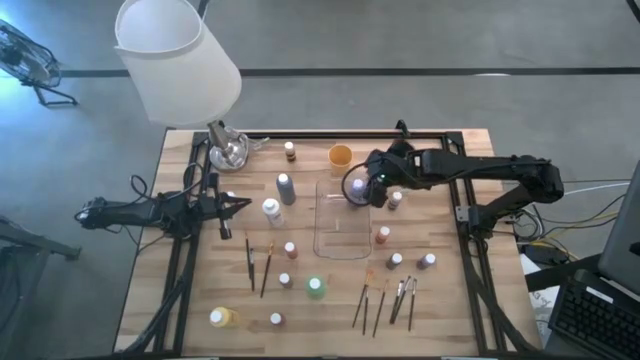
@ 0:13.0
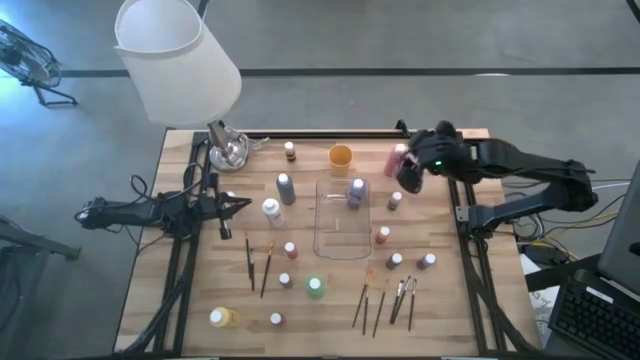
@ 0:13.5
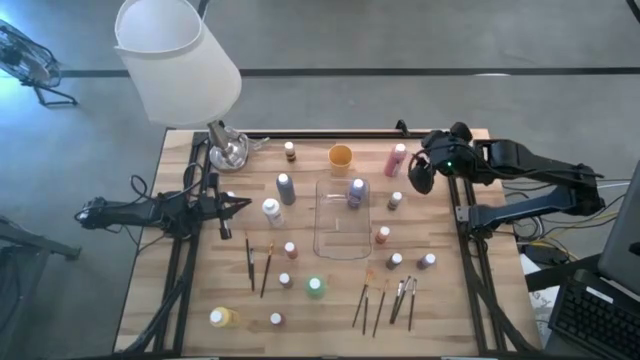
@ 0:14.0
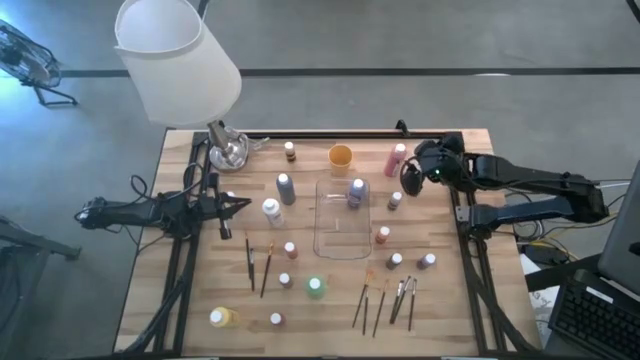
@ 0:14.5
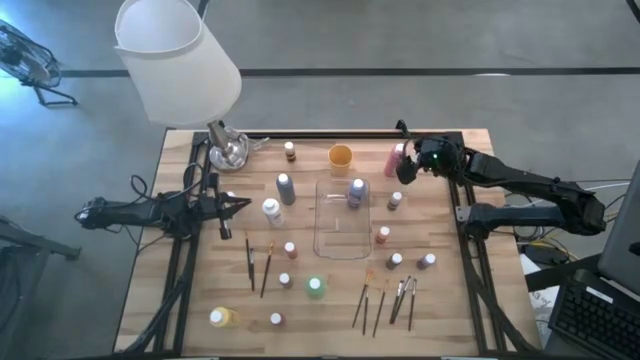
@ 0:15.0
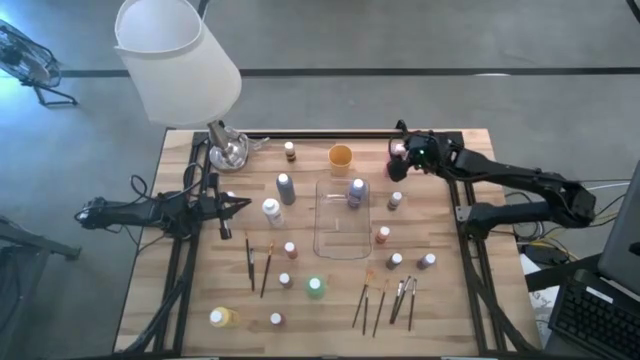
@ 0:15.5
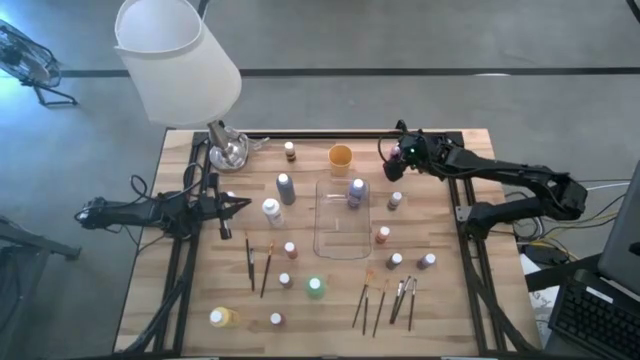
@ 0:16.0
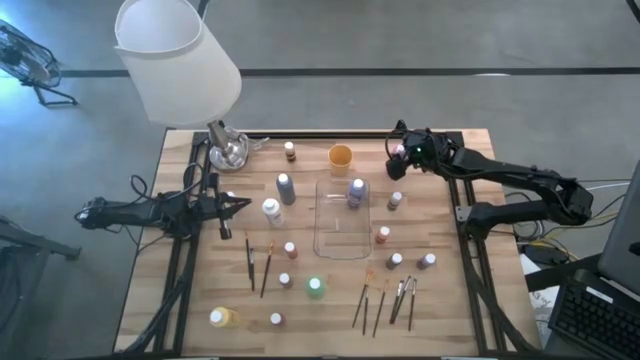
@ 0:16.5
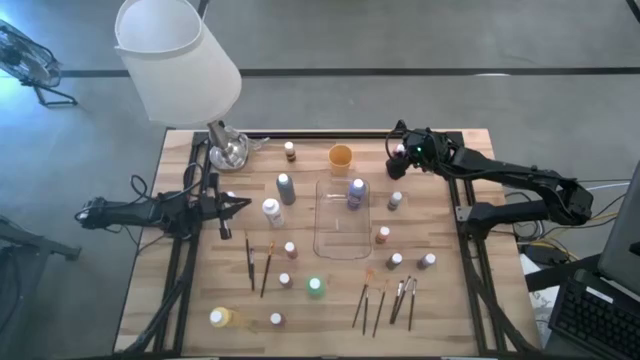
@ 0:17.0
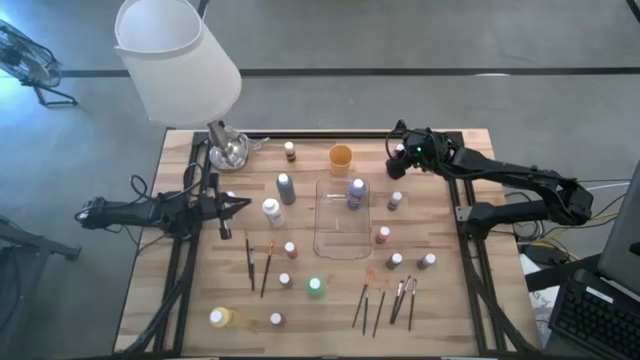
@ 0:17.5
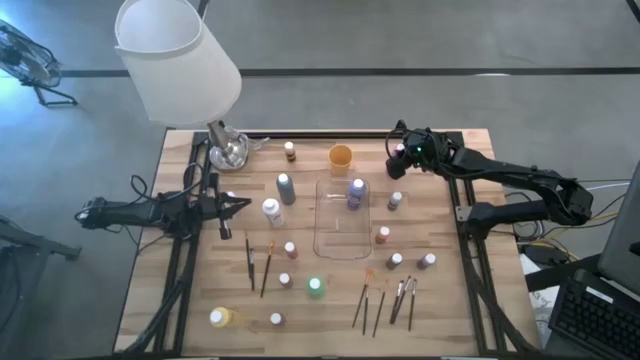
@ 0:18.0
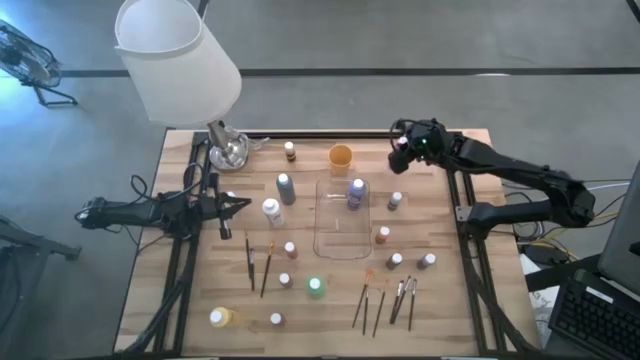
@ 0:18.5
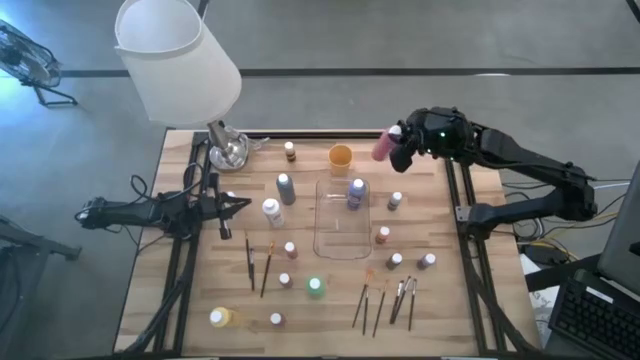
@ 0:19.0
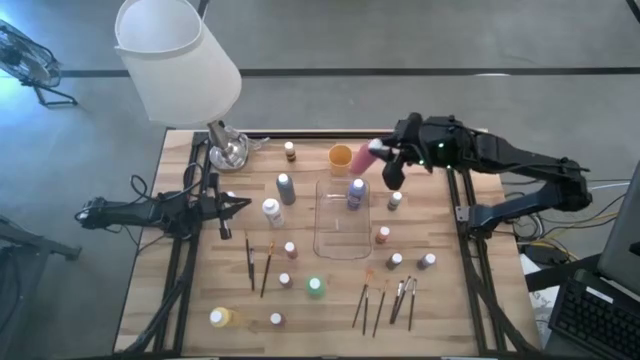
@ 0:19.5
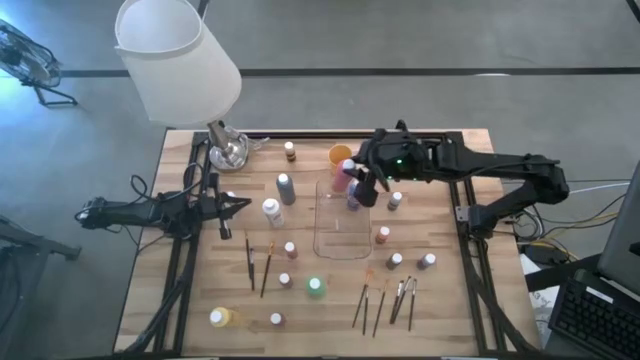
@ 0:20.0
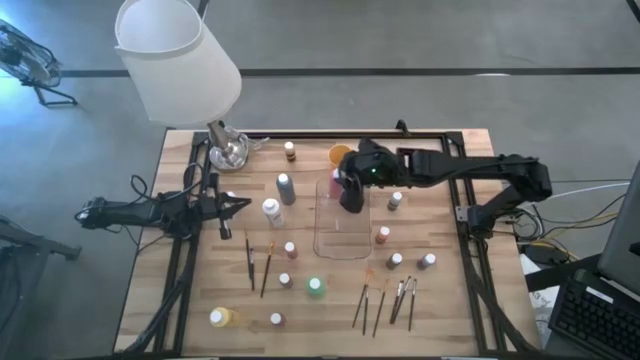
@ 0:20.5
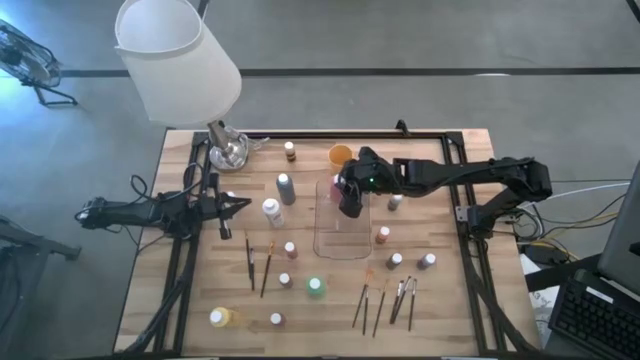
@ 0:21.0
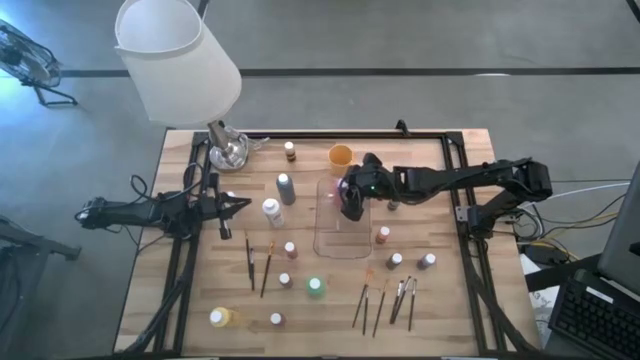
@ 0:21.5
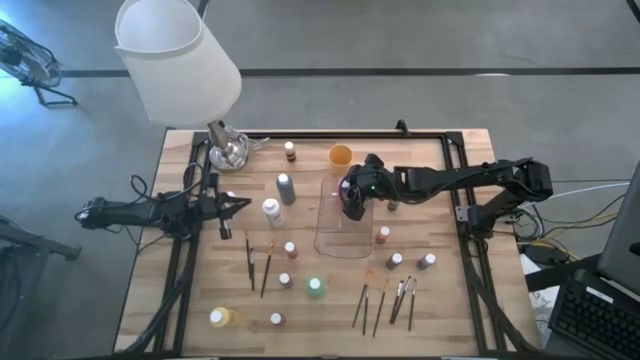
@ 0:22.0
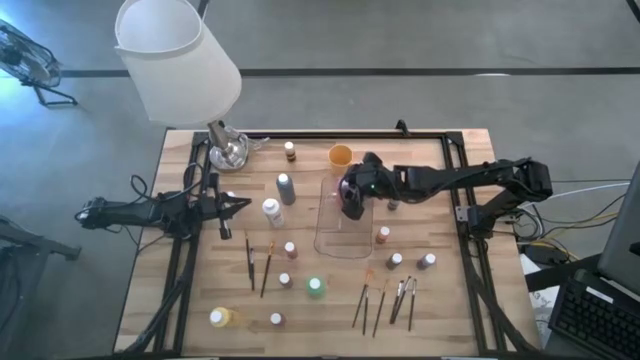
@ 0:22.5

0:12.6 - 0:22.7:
Task: Pick & Place Paint Supplies
Put the red paint bottle into the transparent bin

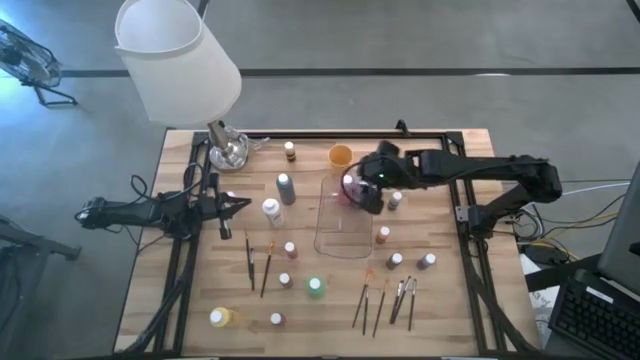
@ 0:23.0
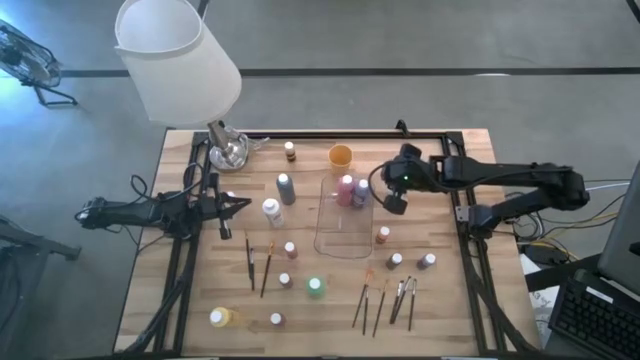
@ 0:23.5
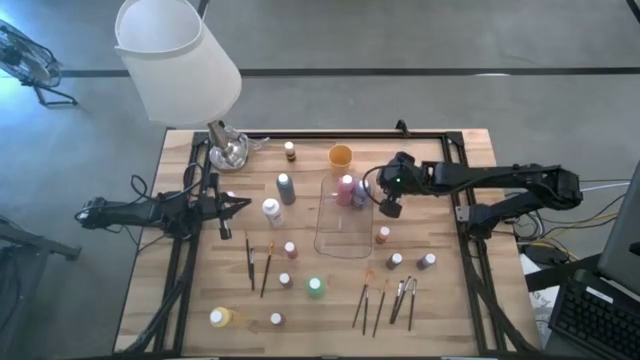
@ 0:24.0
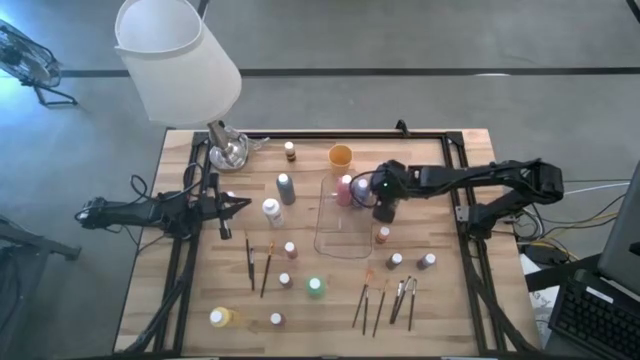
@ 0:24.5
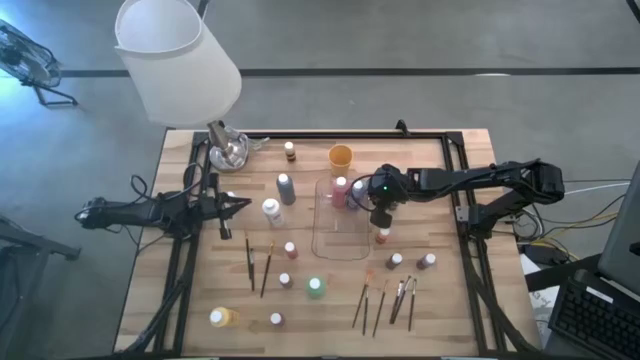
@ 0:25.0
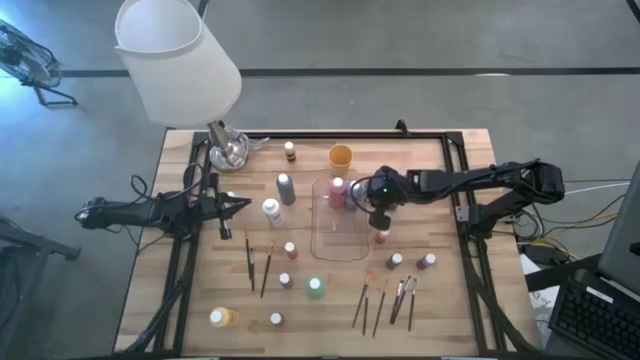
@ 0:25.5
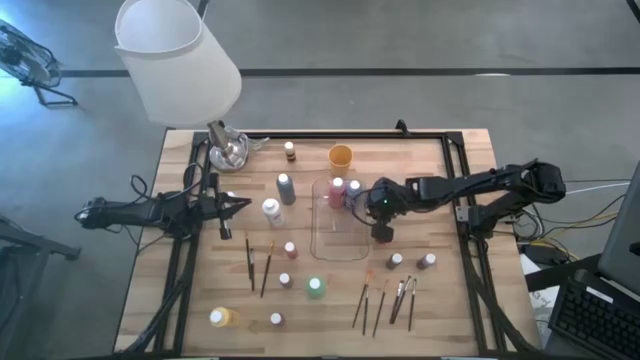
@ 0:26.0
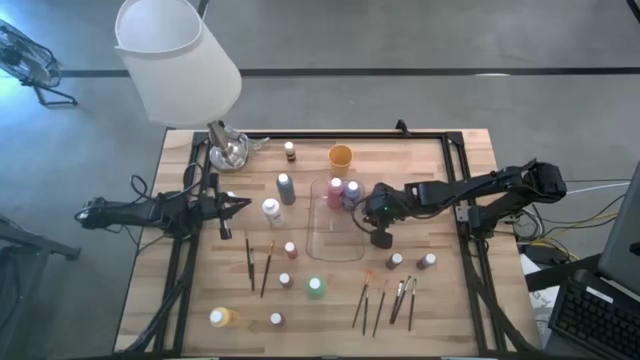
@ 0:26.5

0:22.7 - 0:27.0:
Adjust the transparent bin

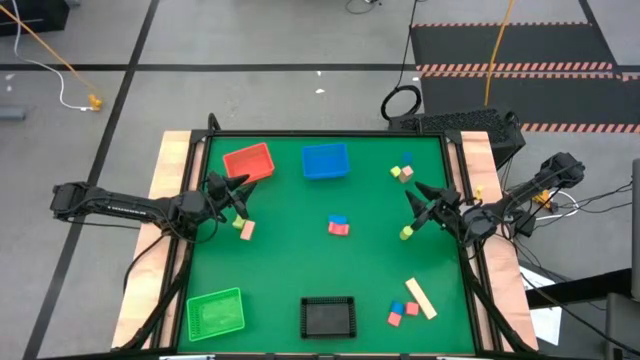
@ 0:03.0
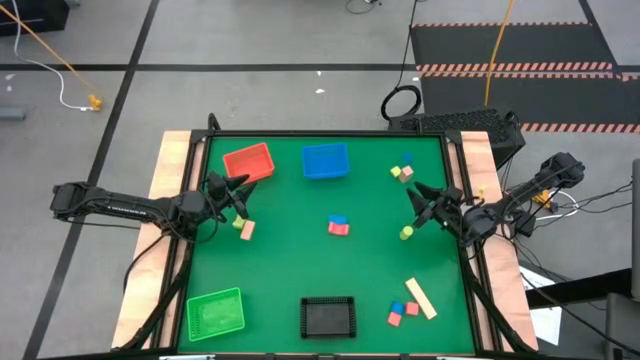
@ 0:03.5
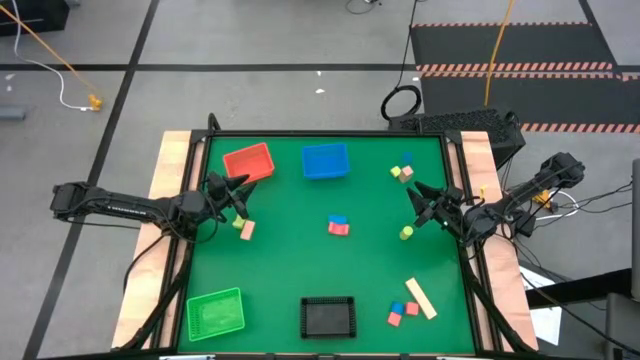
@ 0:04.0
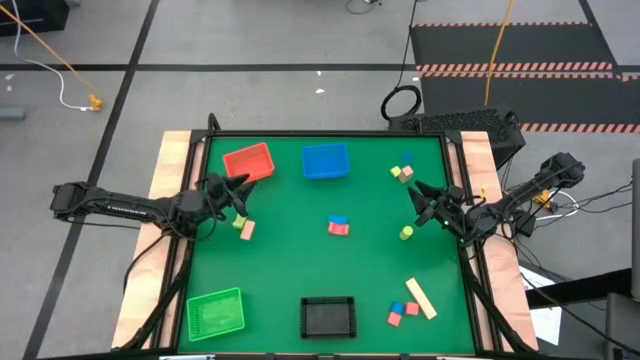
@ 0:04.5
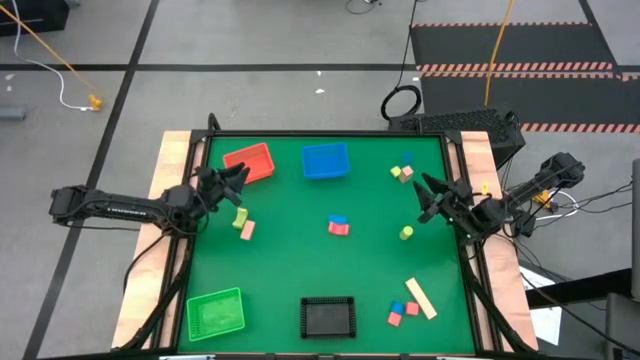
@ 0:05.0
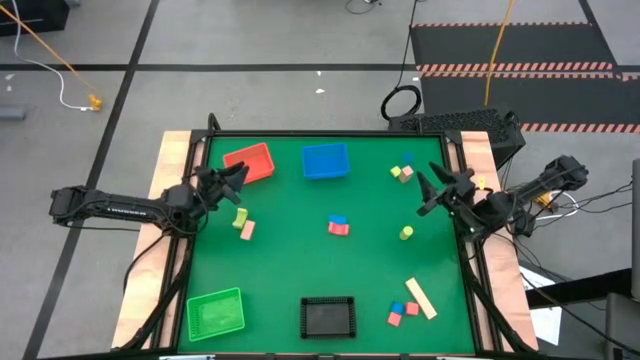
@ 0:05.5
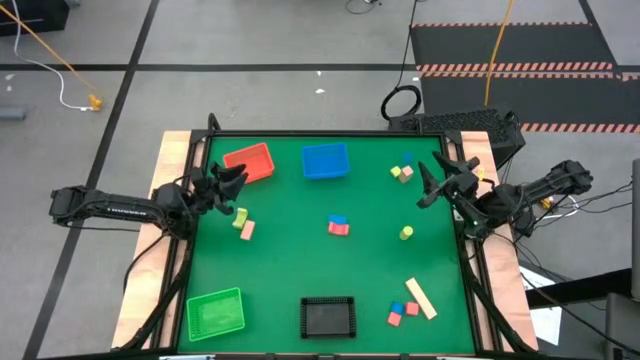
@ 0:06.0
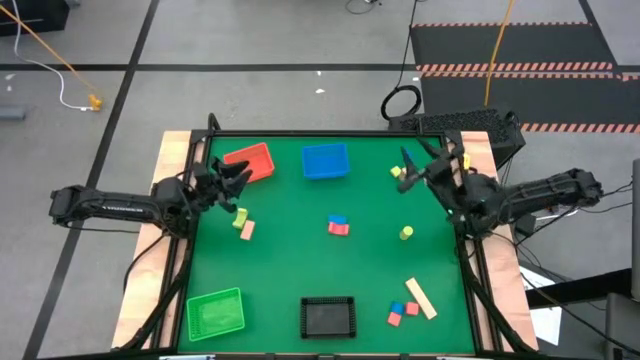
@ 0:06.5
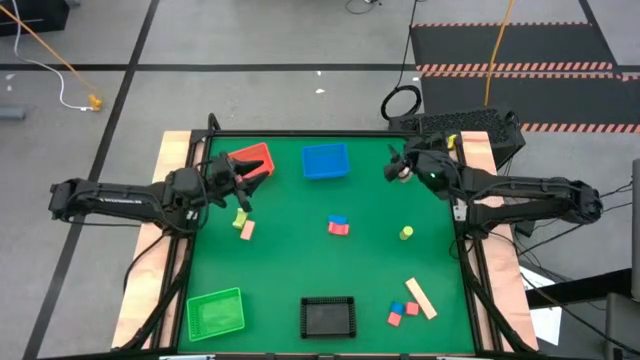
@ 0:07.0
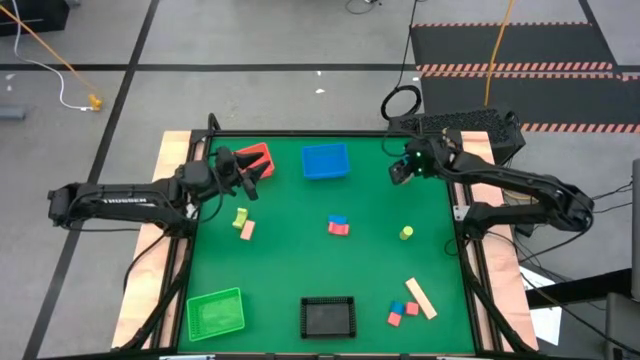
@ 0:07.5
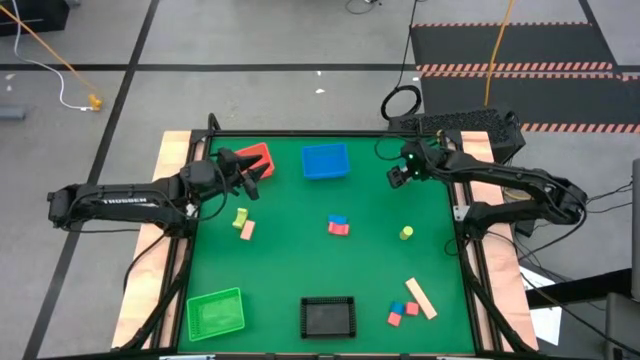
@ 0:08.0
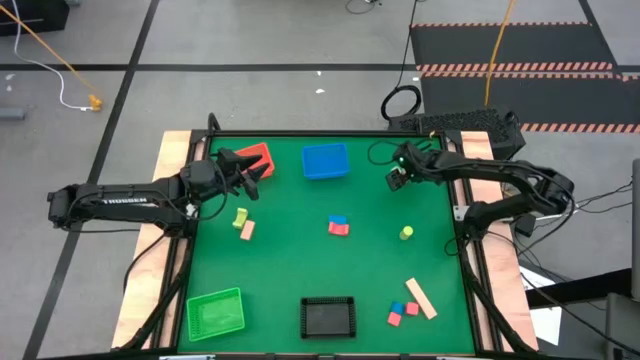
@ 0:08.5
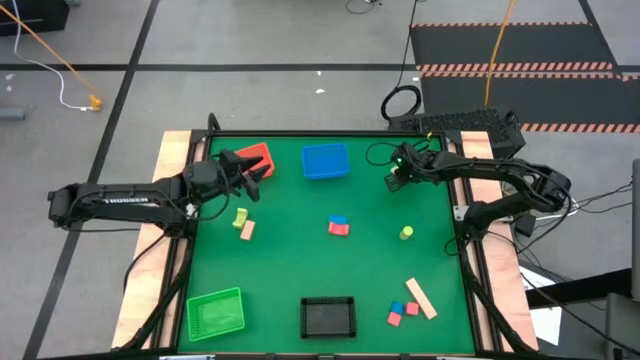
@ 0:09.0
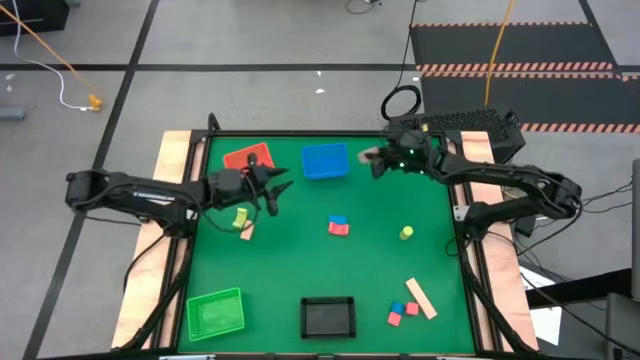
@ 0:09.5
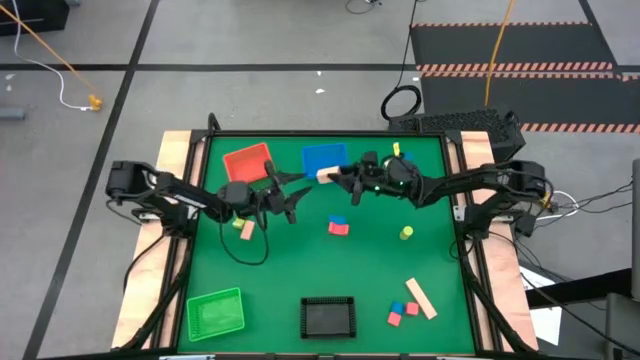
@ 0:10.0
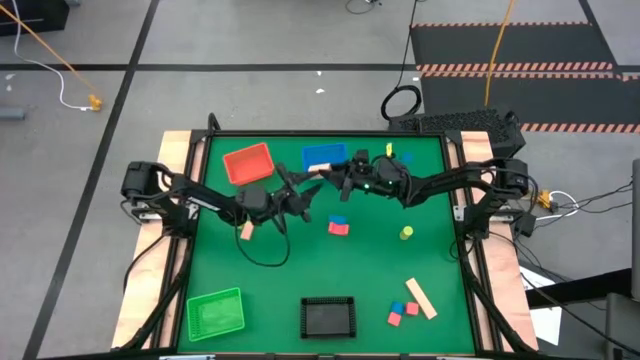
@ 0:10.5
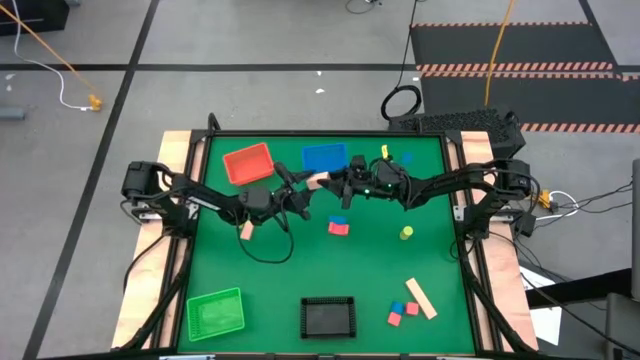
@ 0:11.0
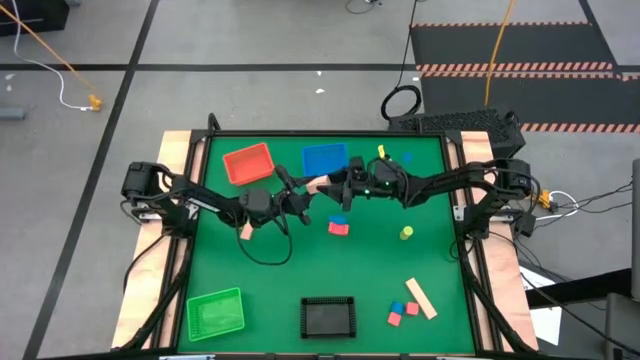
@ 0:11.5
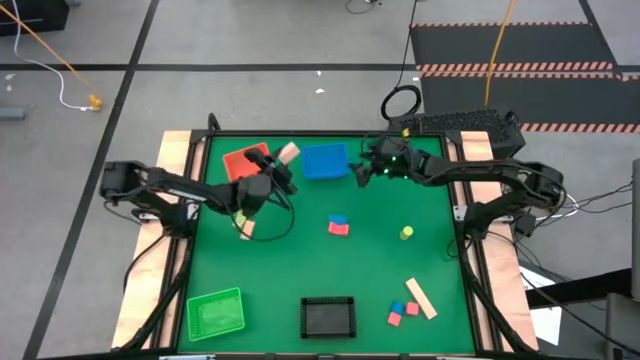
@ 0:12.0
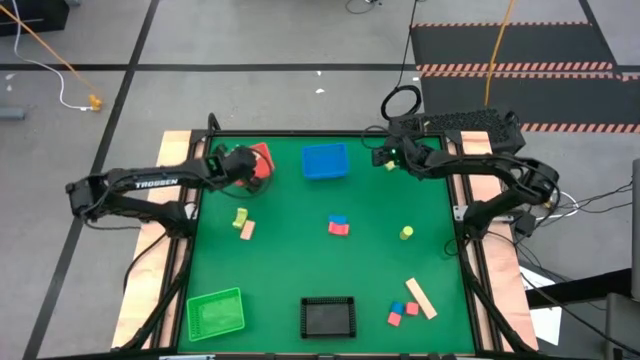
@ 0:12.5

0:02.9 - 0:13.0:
Task: Sort & place blocks by color
Put the top right light brown block into the orange bin
